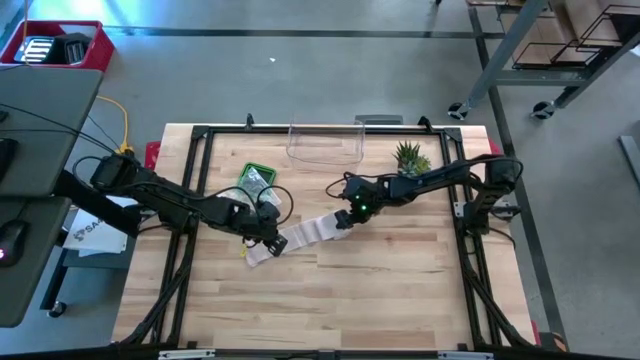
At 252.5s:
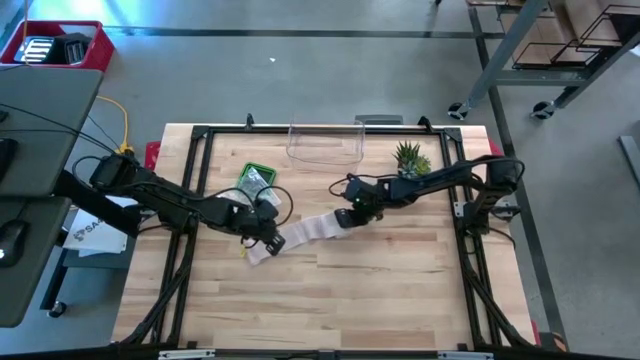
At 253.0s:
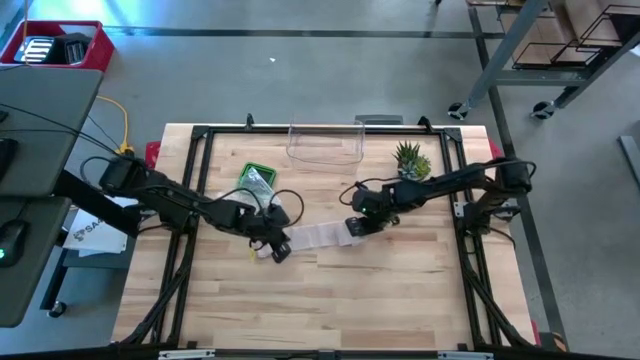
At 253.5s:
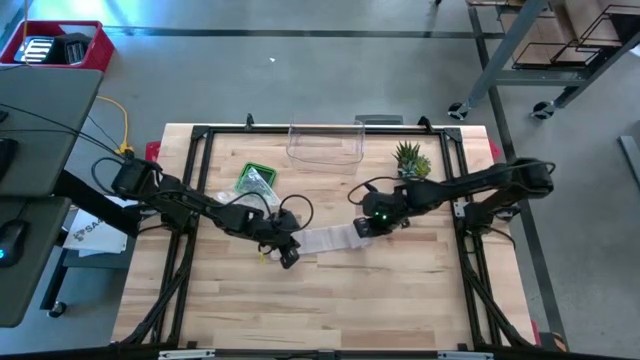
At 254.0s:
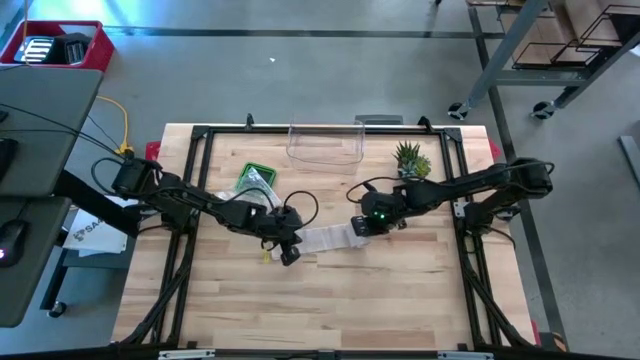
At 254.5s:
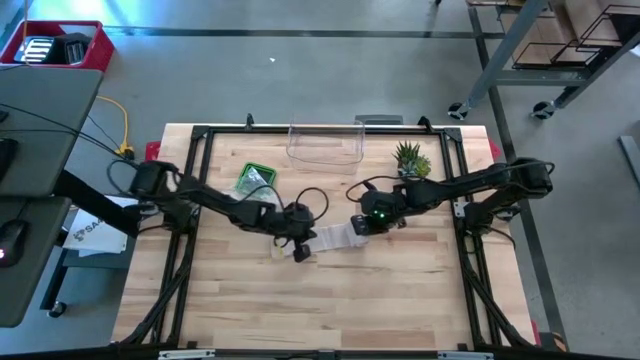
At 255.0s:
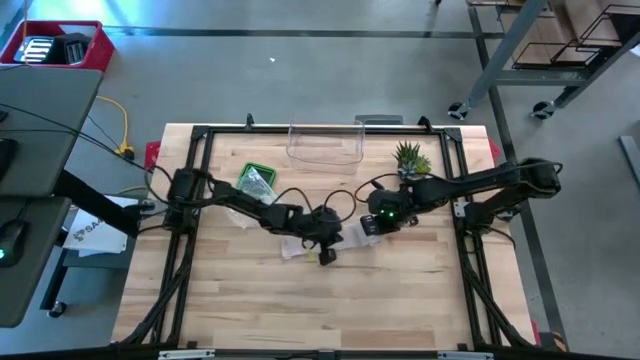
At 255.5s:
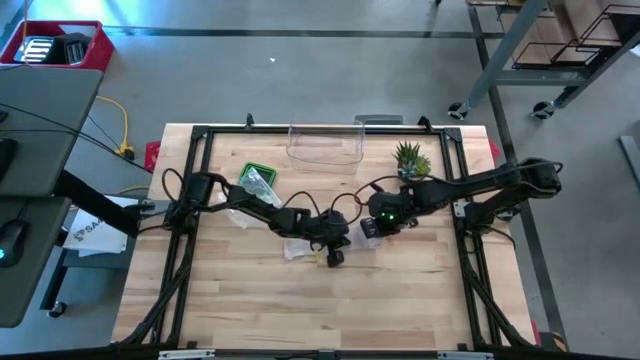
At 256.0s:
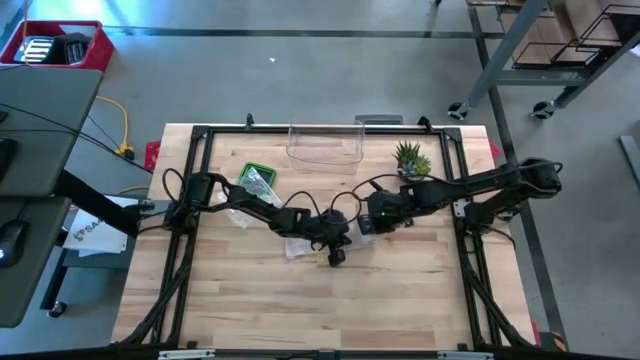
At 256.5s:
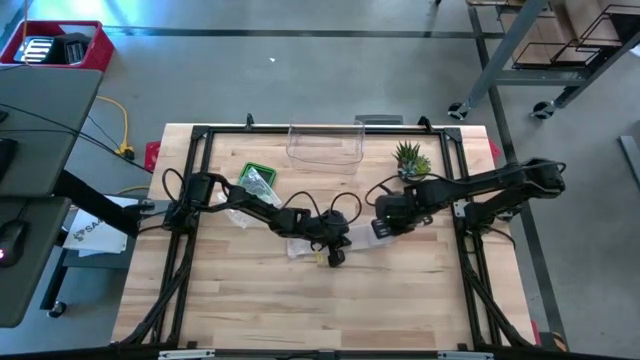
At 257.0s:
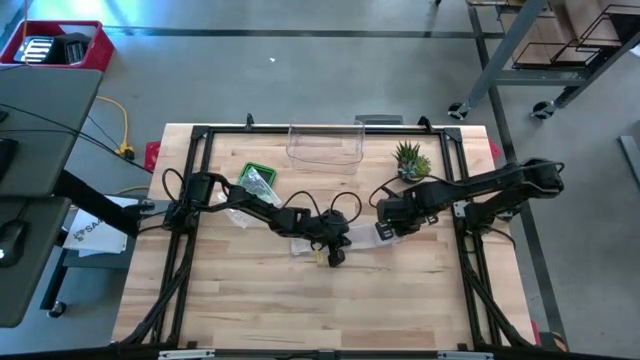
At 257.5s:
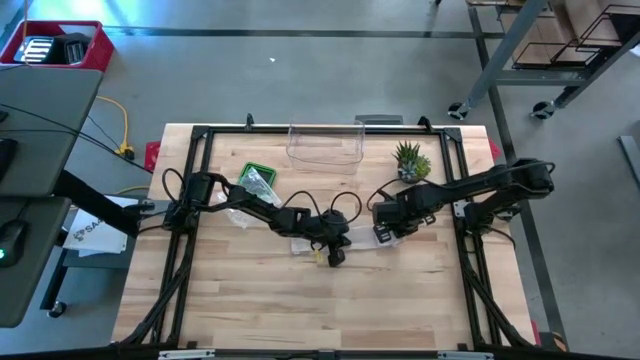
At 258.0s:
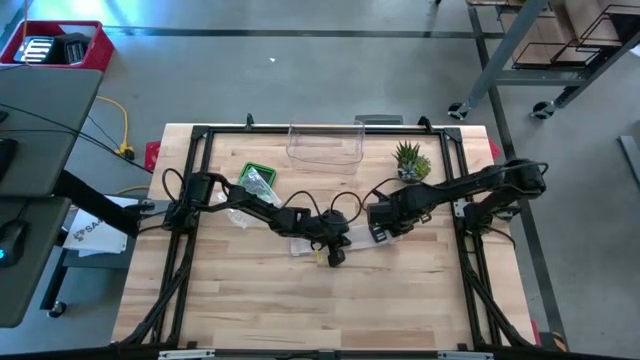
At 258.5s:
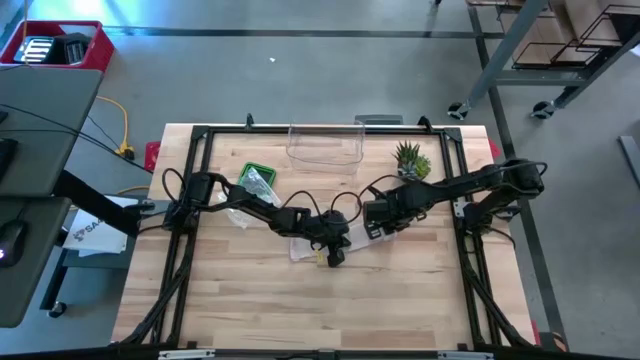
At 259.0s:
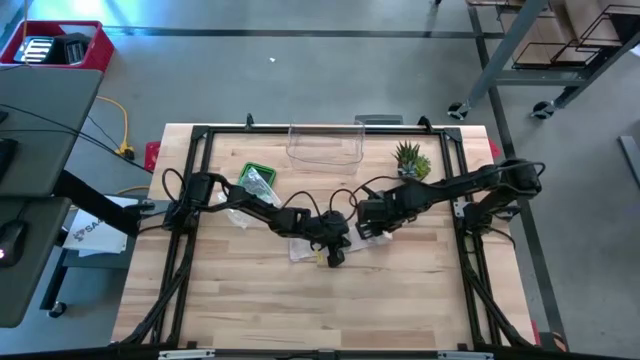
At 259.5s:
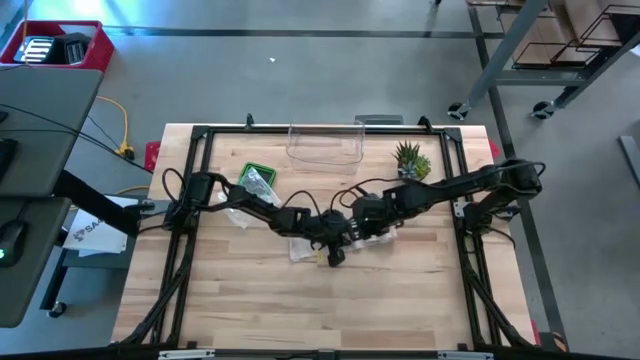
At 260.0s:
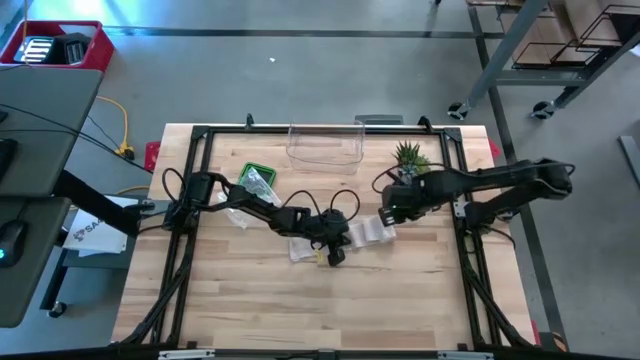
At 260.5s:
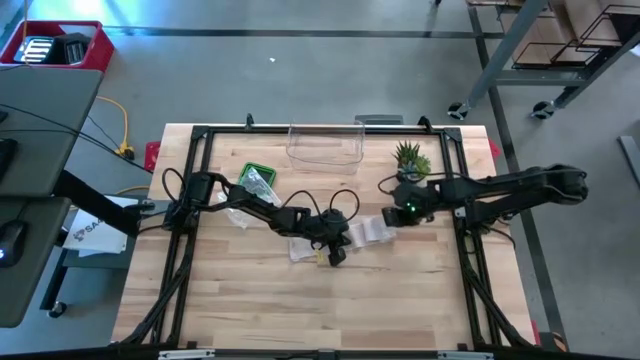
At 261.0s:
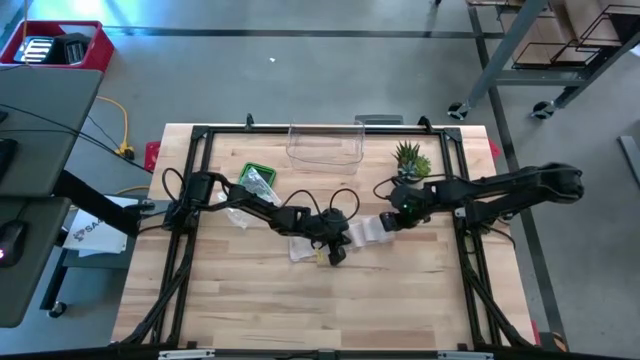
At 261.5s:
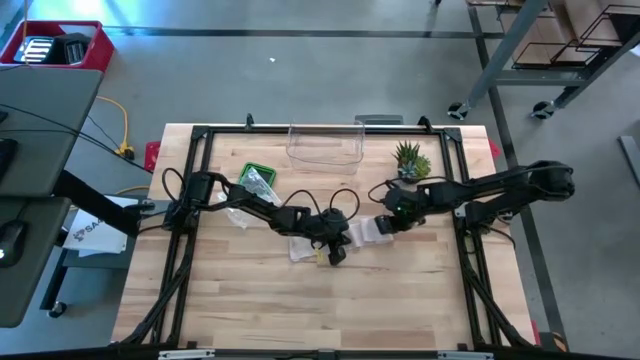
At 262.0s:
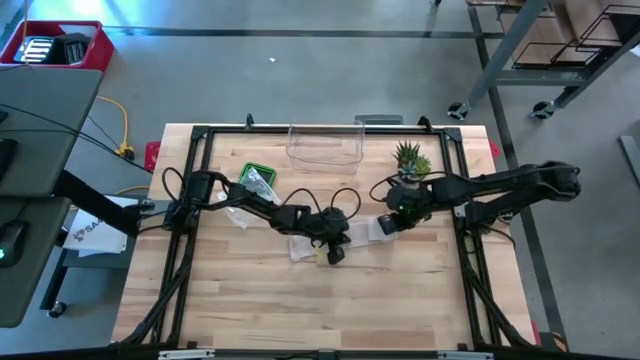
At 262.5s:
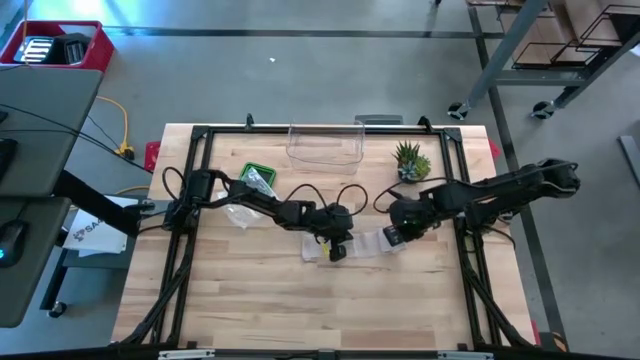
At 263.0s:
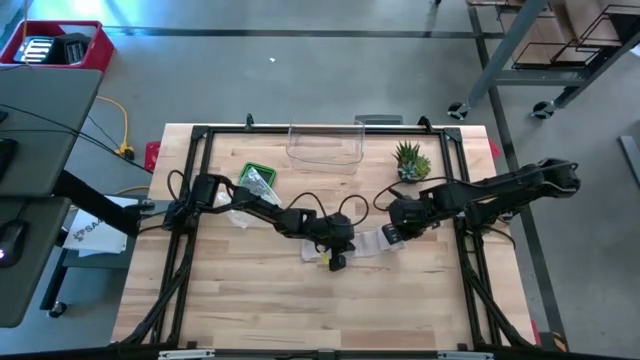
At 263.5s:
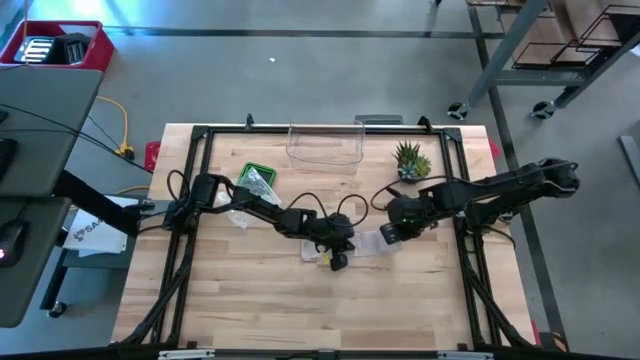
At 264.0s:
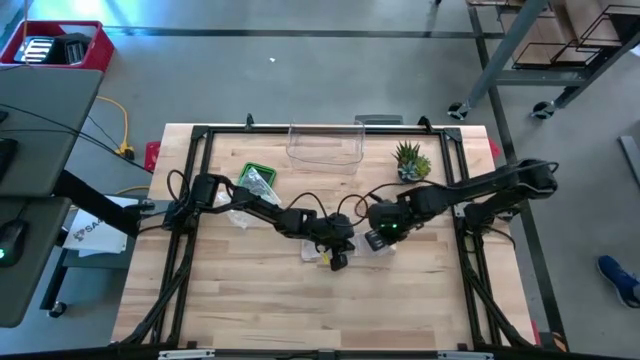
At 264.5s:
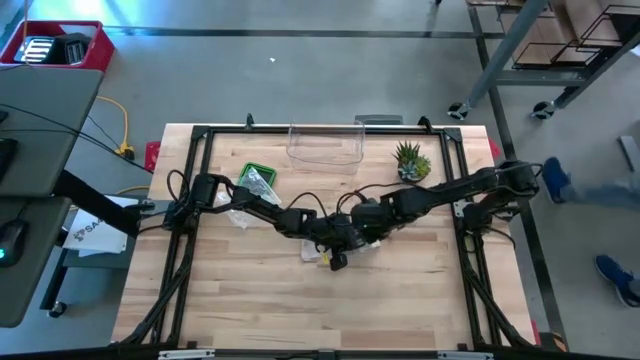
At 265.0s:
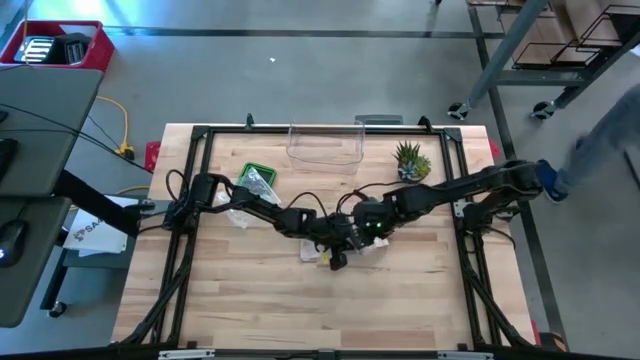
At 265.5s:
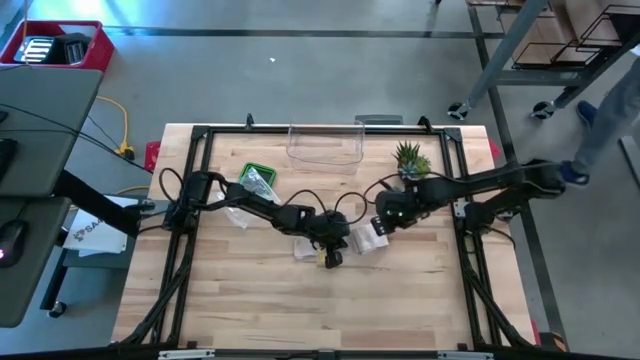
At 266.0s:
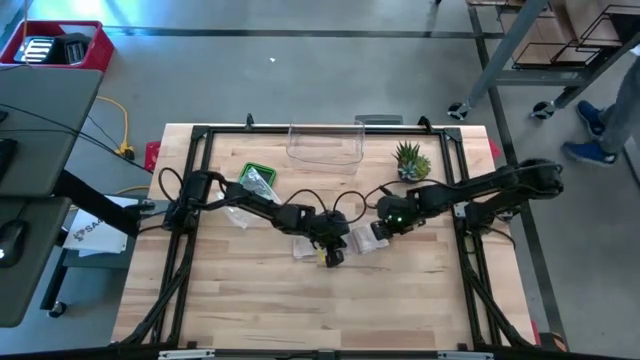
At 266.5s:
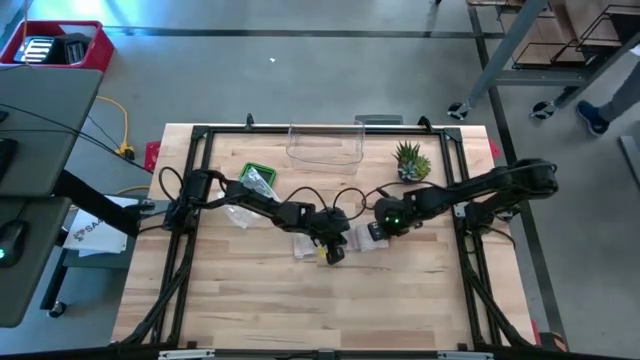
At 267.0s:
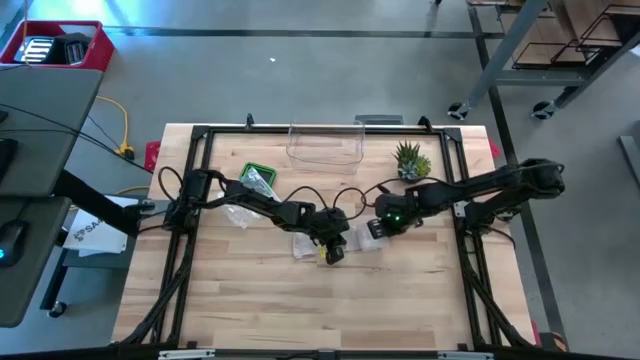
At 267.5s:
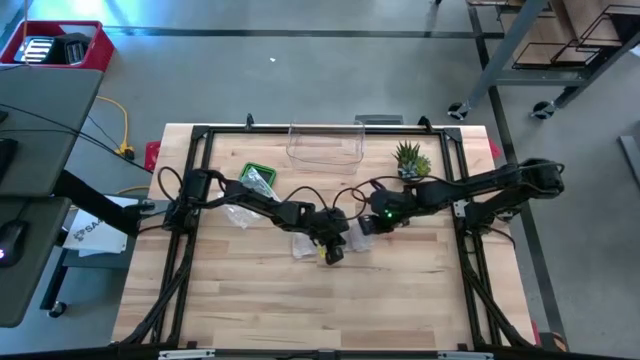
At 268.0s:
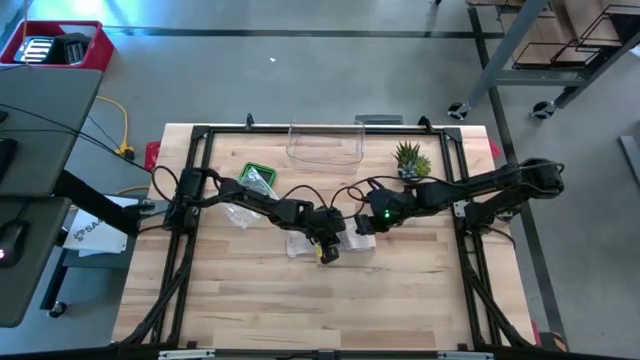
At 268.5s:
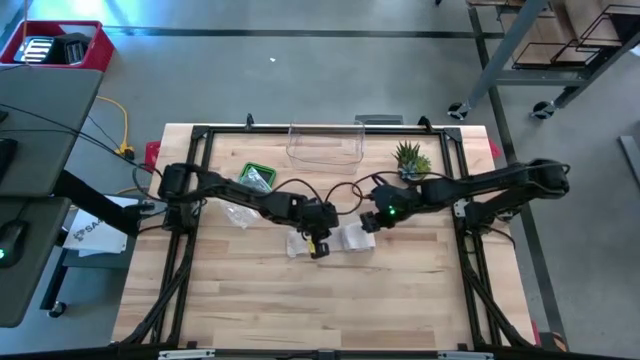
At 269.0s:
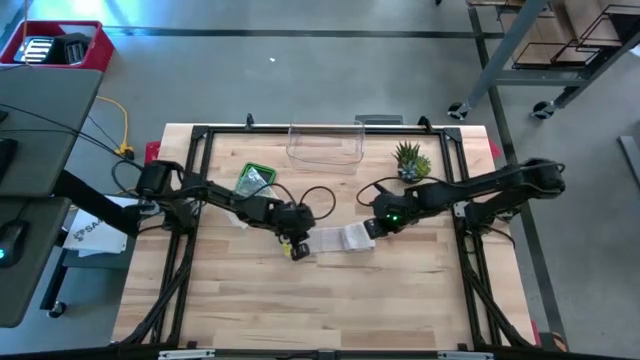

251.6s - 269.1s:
Task: Roll bandage
Roll the bandage

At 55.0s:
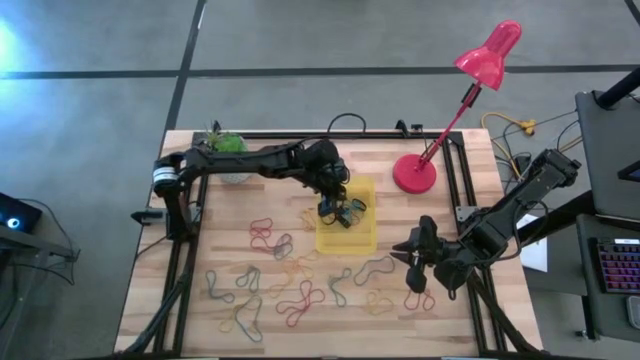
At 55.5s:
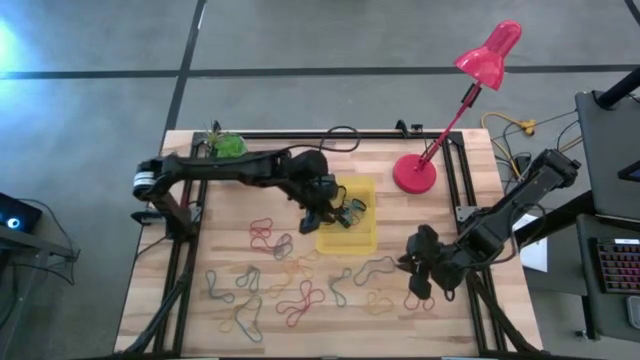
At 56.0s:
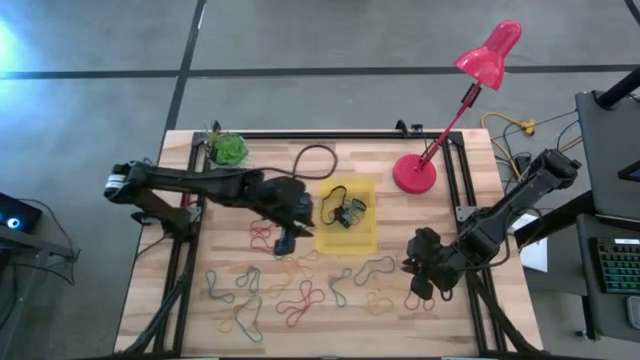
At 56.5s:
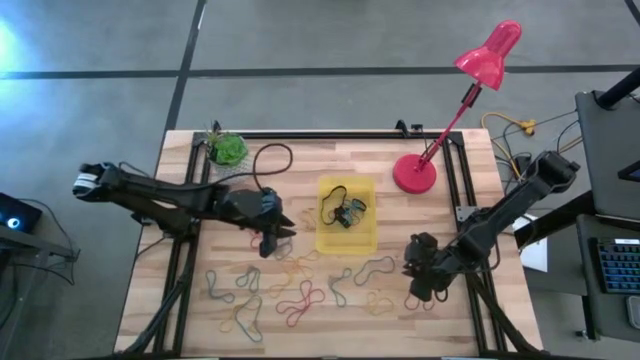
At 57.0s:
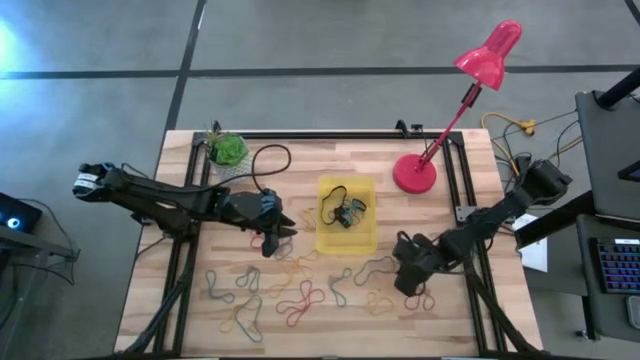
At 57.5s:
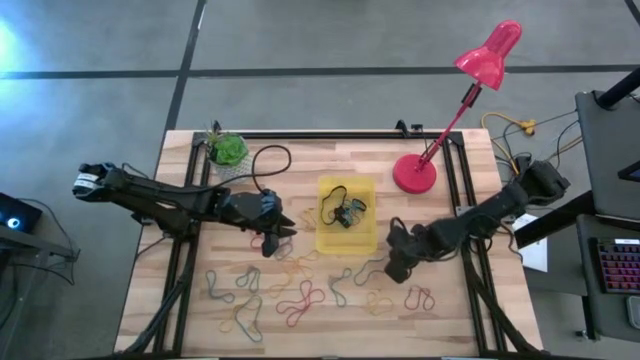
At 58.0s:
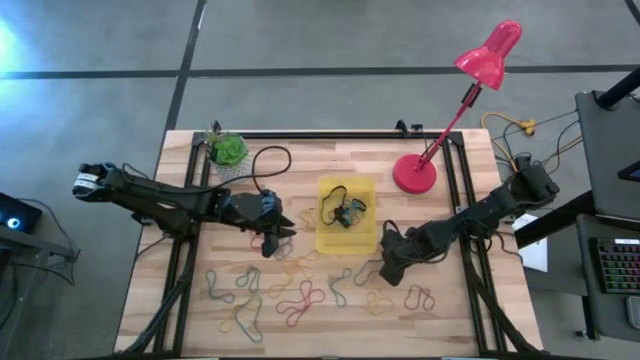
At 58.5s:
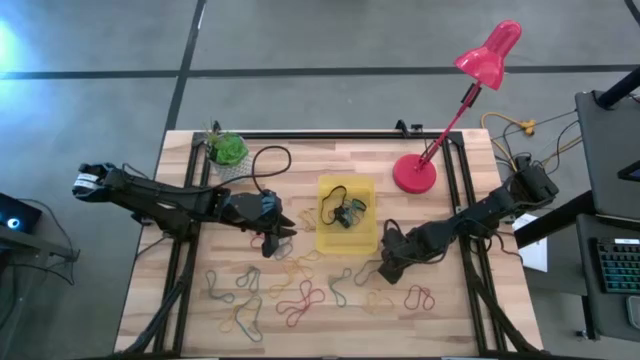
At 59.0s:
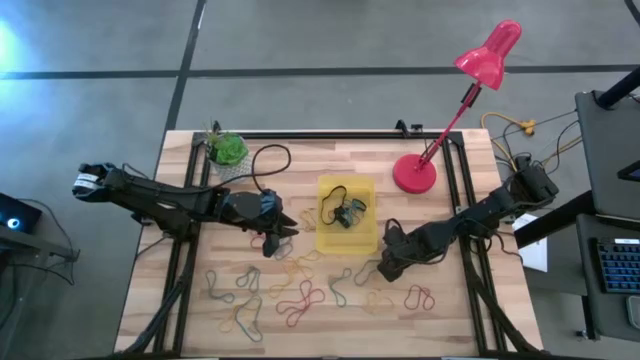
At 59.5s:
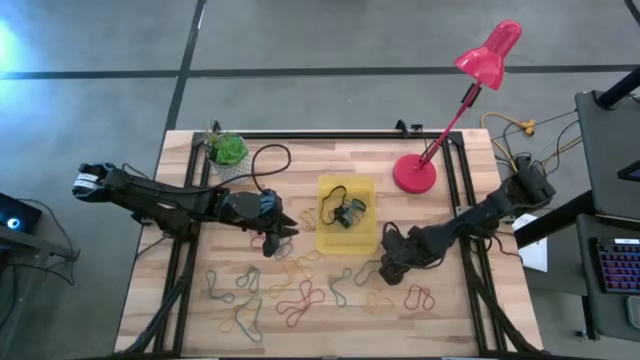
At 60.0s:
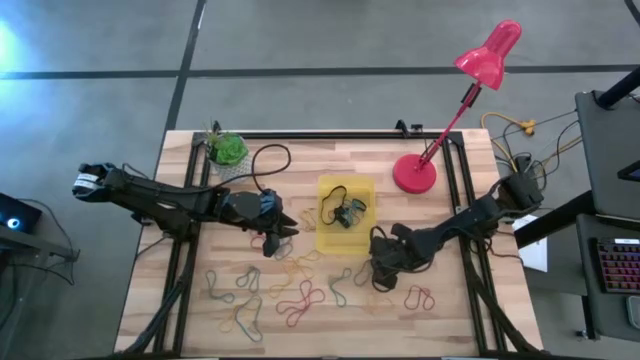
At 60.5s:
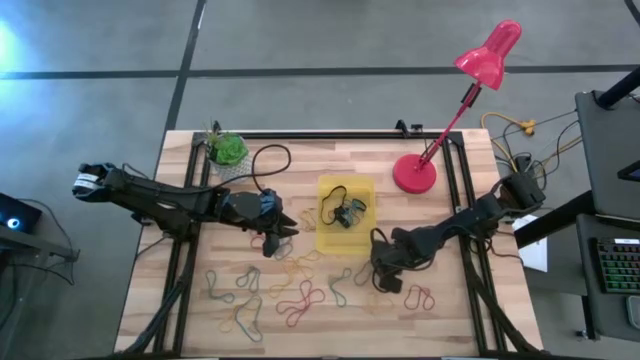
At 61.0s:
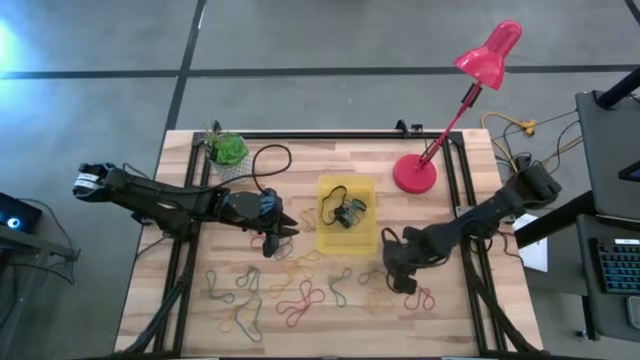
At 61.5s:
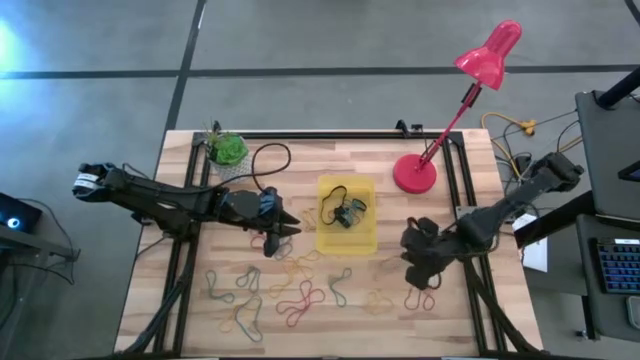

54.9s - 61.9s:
Task: Pick and place rubber bands into bin
Put the blue rubber band into the bin
